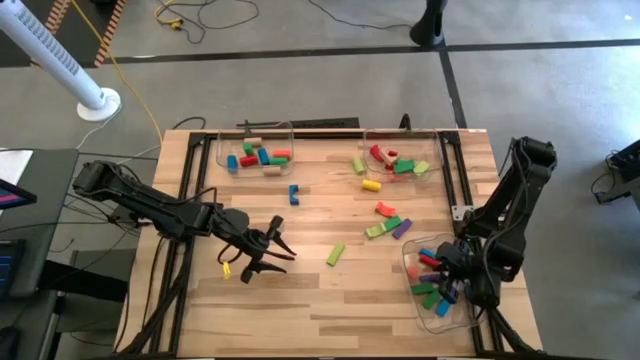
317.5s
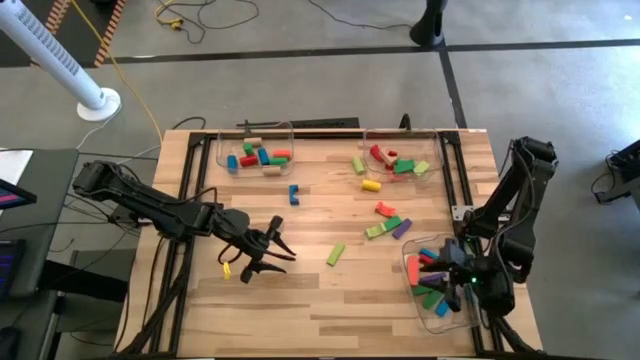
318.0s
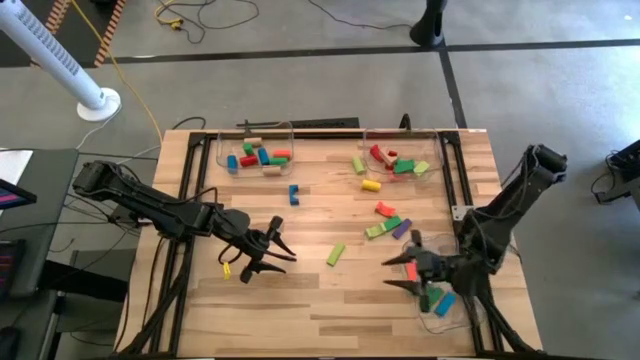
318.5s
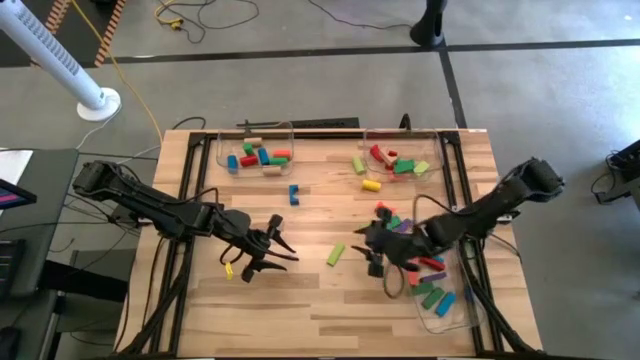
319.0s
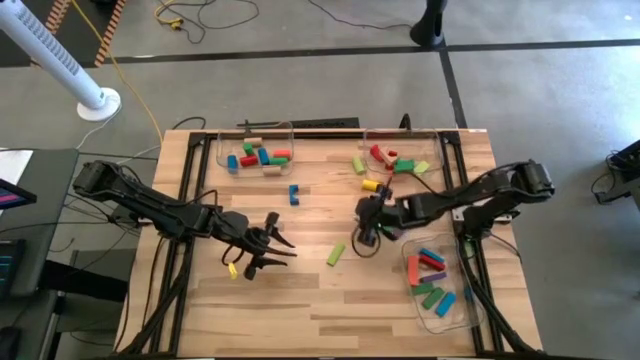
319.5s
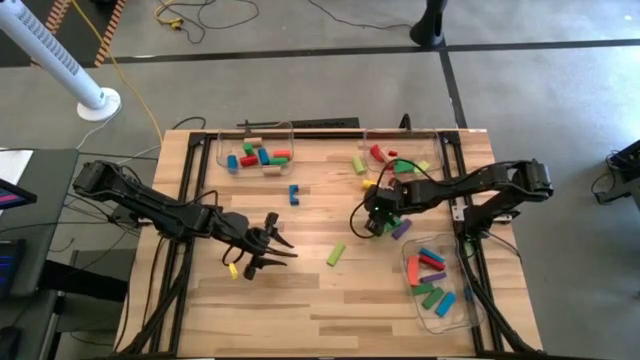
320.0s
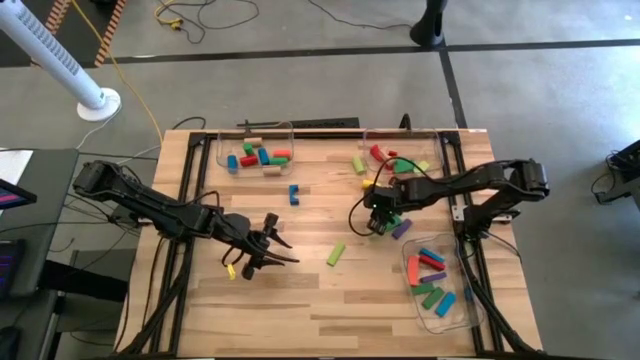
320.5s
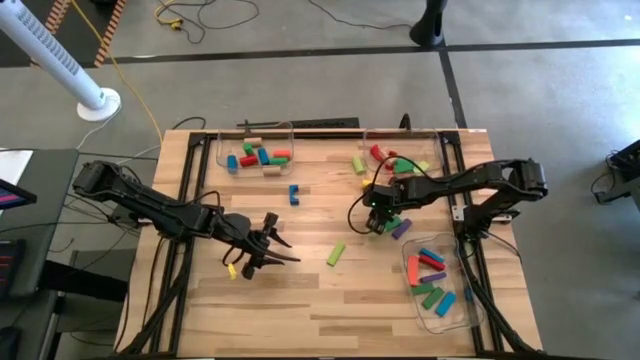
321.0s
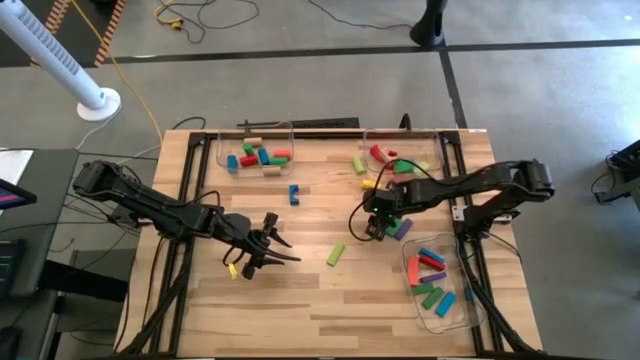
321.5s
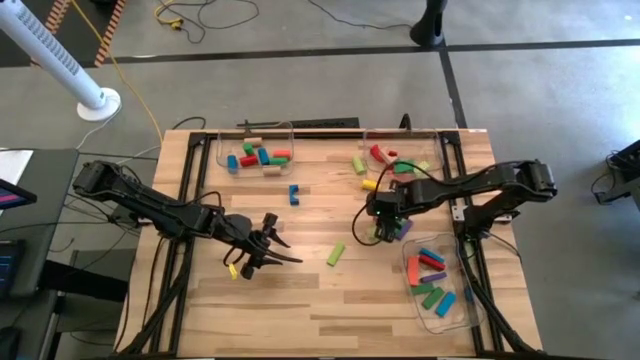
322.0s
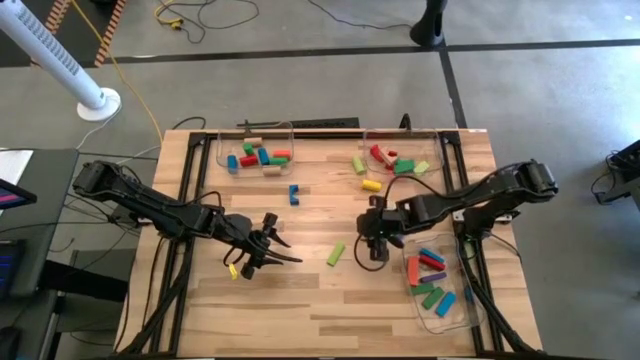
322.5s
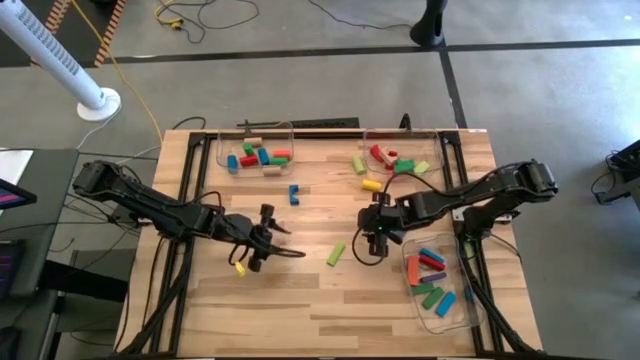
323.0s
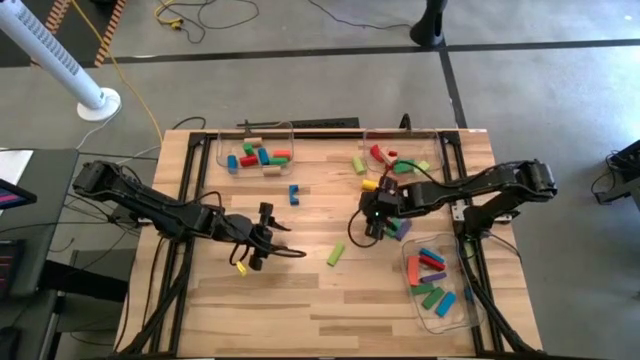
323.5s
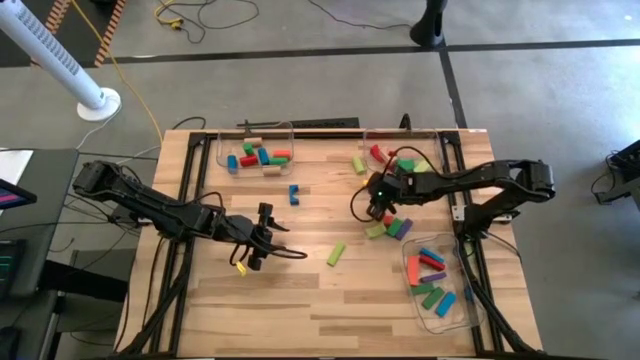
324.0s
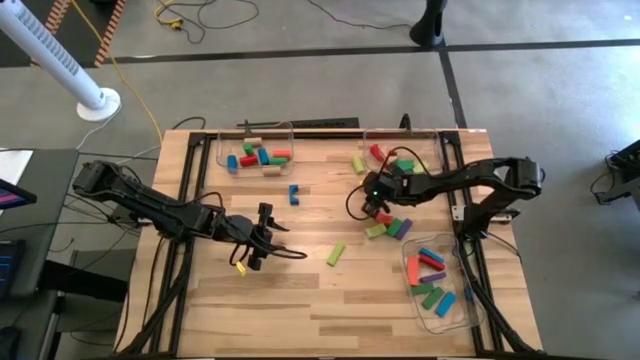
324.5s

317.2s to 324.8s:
Task: Sort blocks by size
Put the yellow cylindrical block into the top left transparent bin

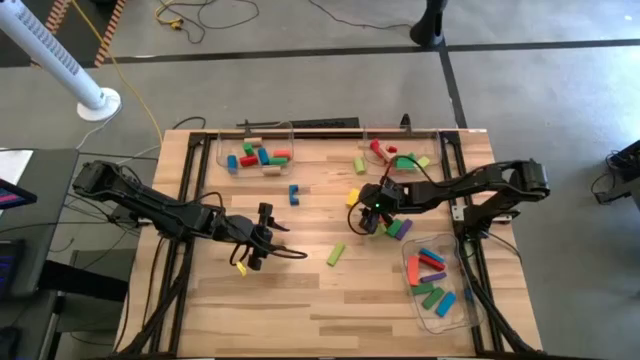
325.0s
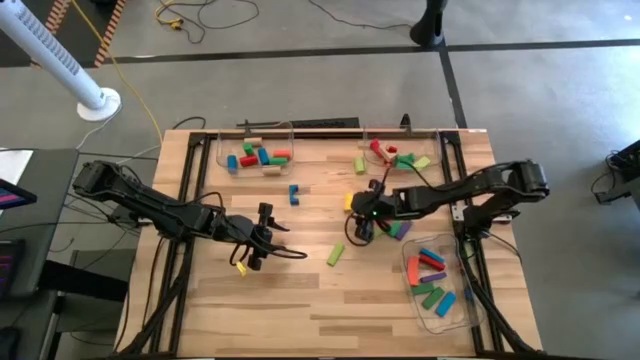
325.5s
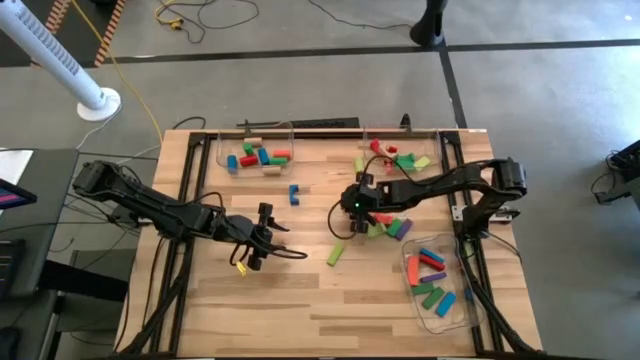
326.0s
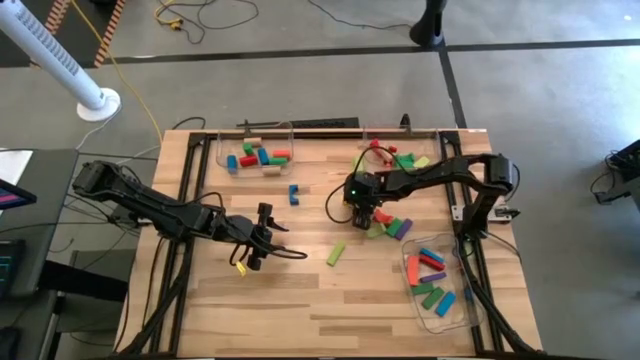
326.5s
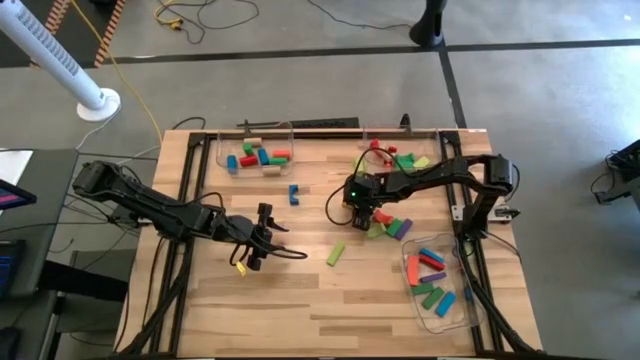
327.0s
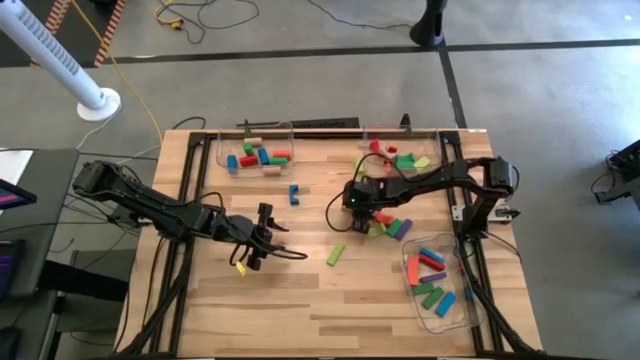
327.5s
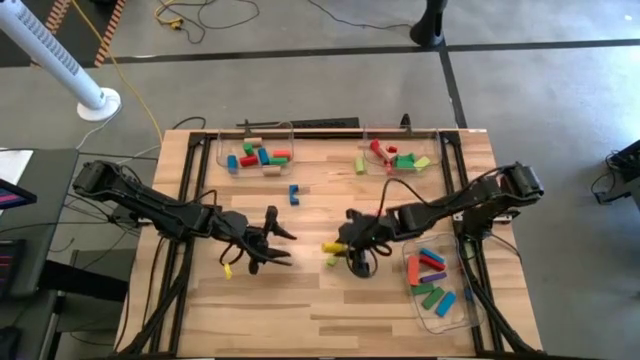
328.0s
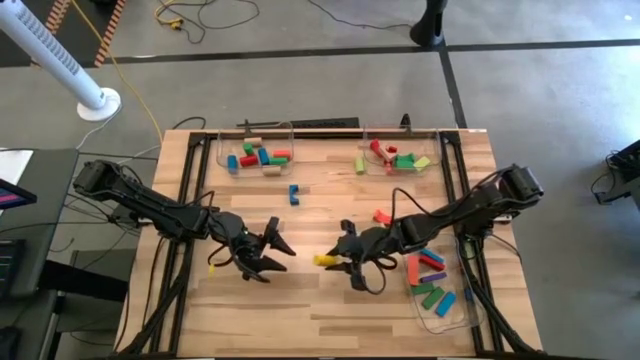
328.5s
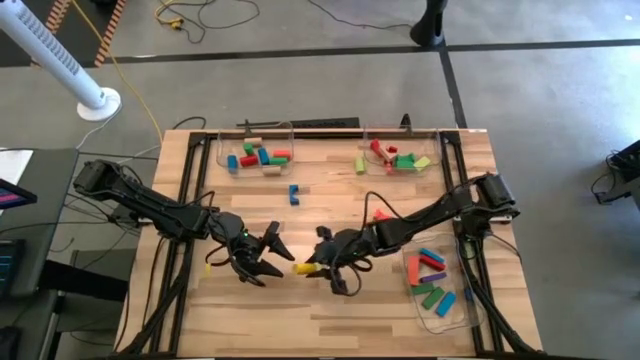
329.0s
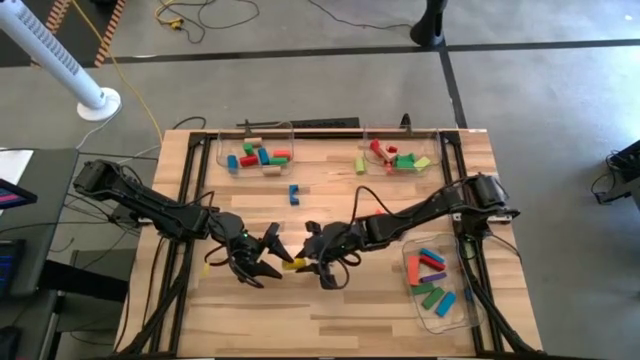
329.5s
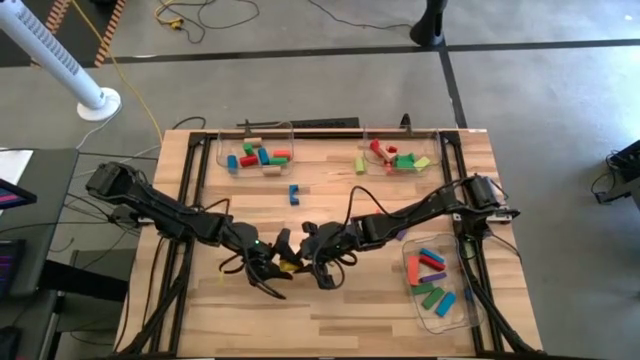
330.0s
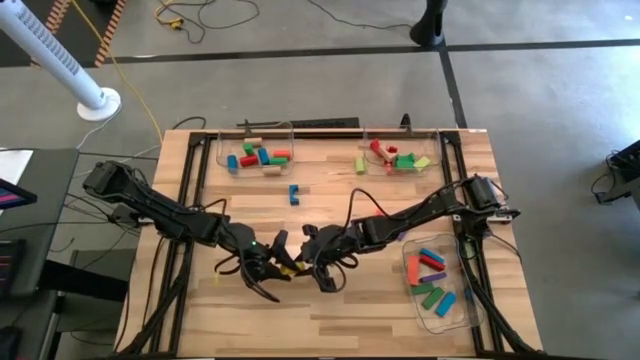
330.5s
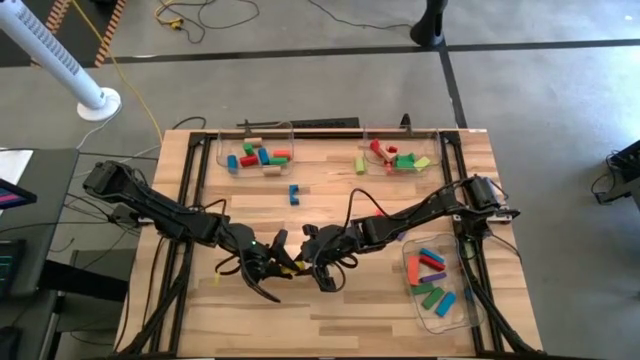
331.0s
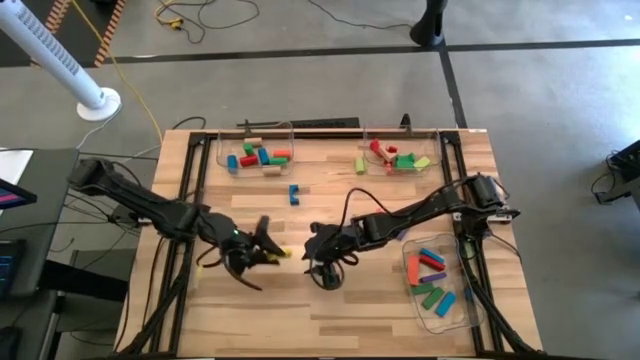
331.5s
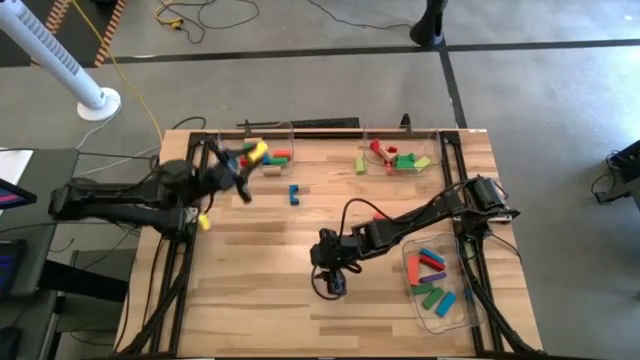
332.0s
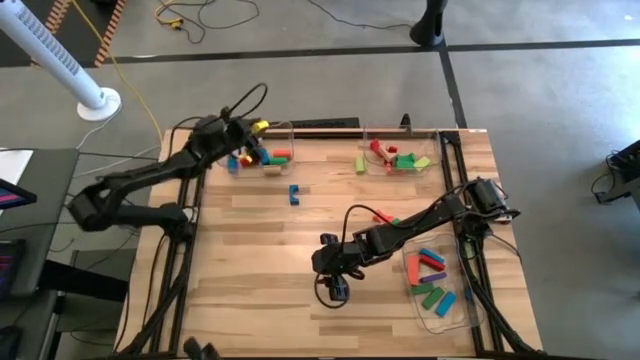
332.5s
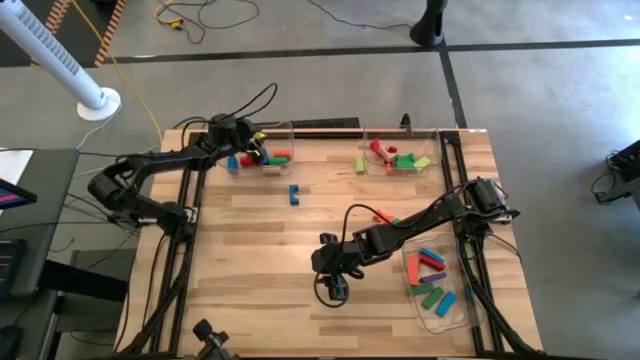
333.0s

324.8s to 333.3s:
Put the yellow cylindrical block into the top left transparent bin

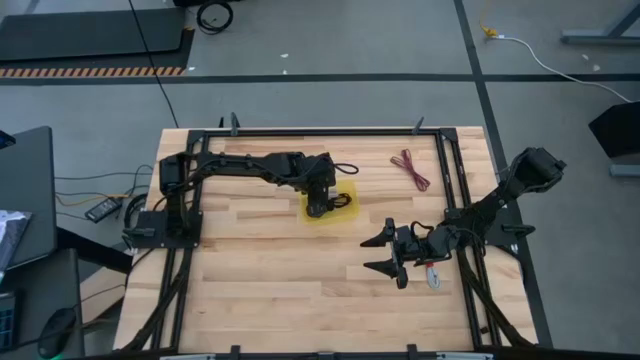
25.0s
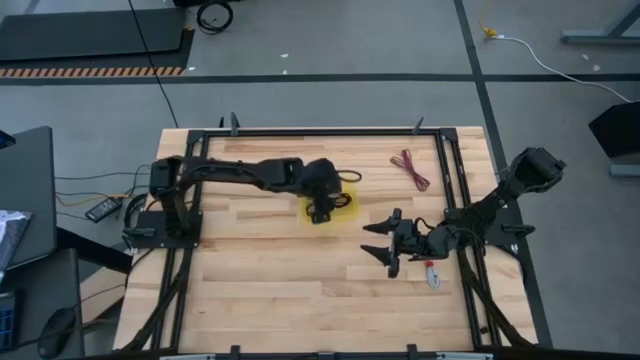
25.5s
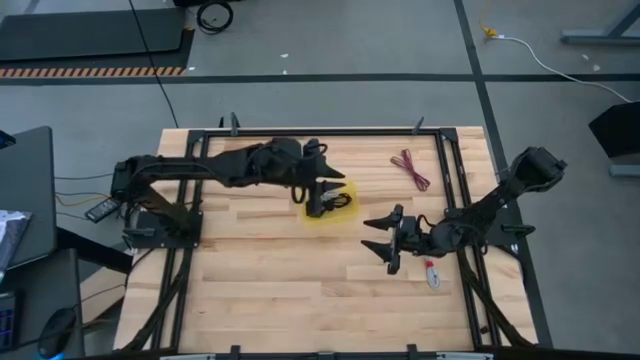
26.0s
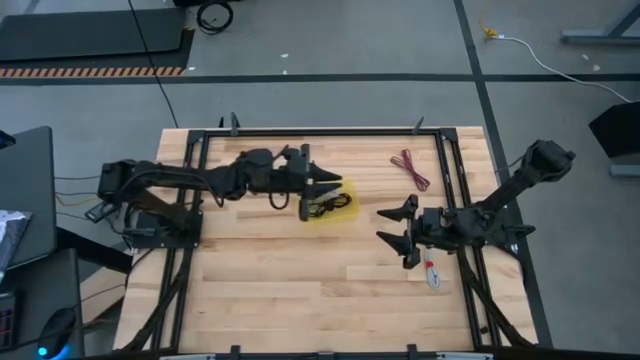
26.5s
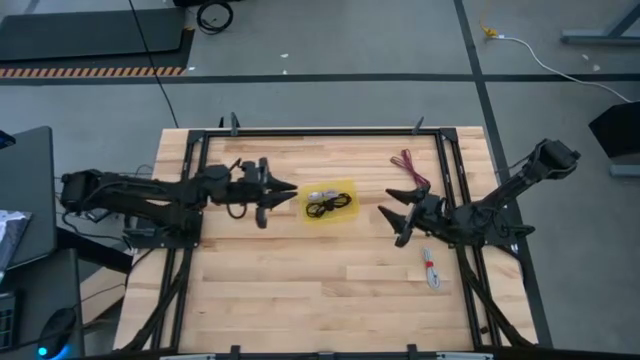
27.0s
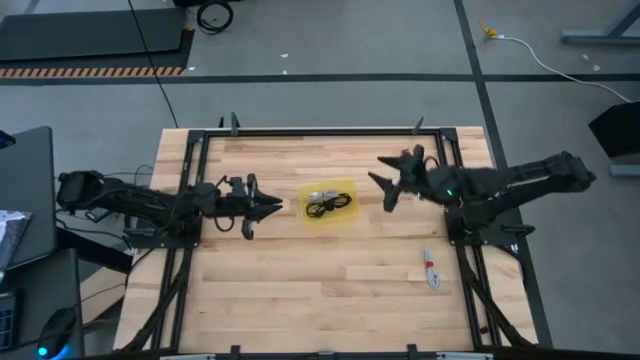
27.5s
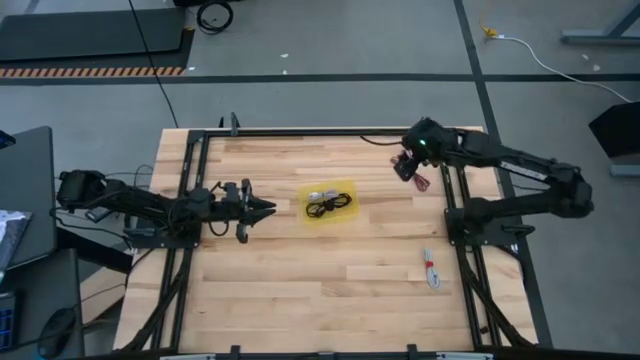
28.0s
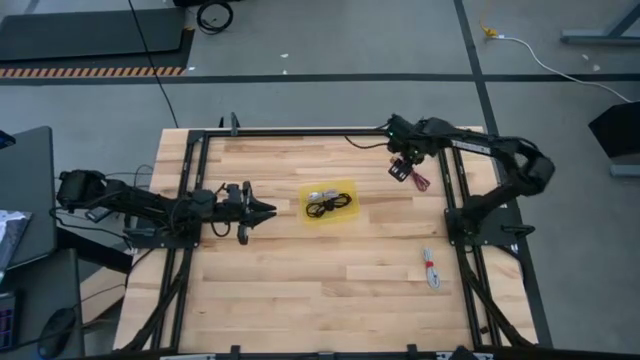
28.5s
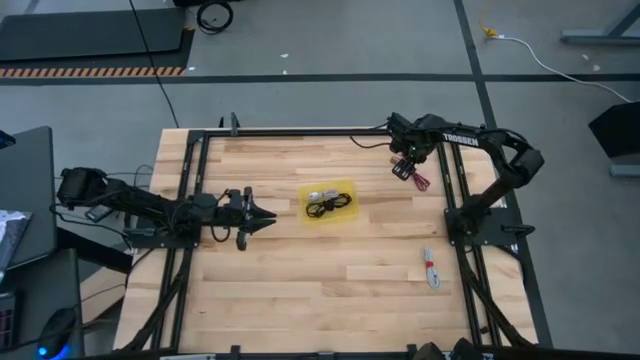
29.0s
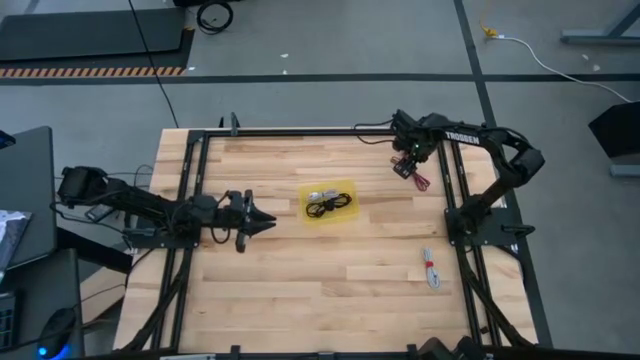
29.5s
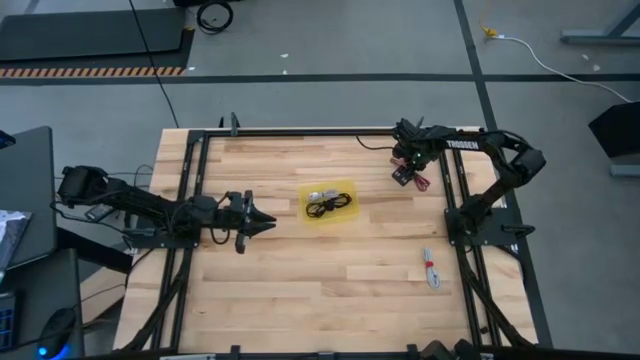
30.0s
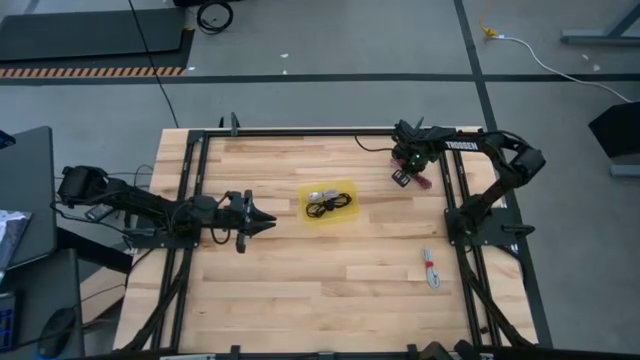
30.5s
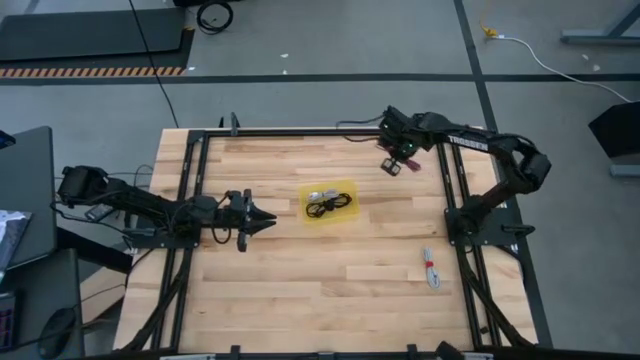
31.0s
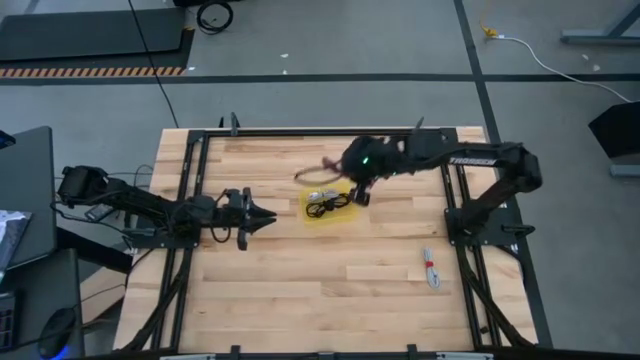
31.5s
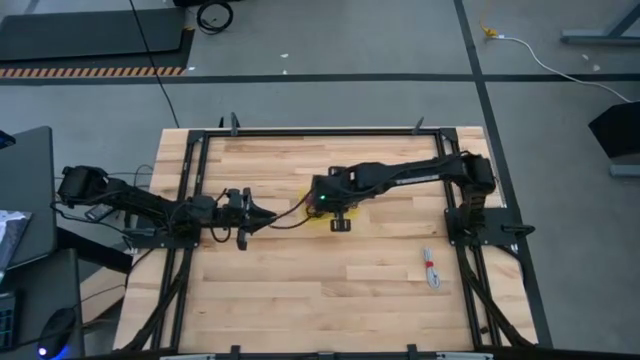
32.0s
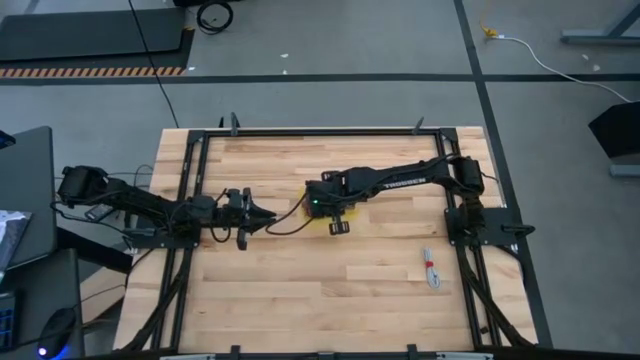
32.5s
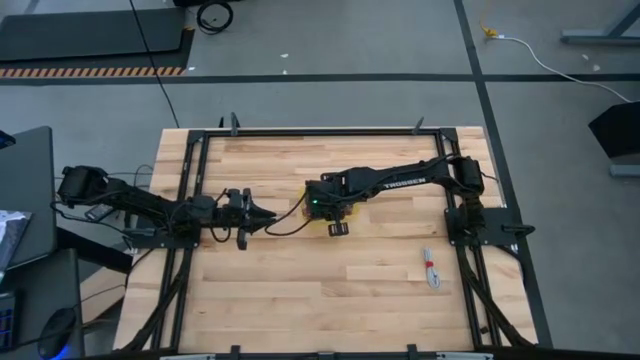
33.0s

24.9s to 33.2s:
Task: Pick and place USB-C Cables
Put the red cable charger into the yellow bin
